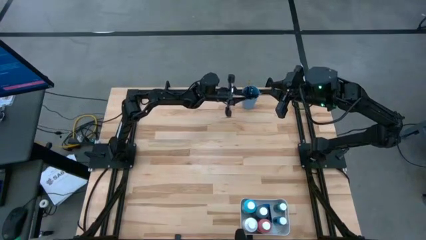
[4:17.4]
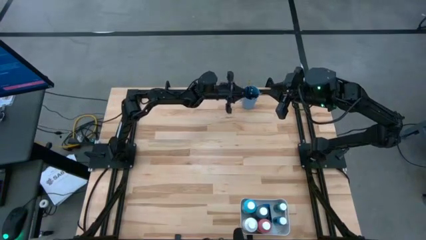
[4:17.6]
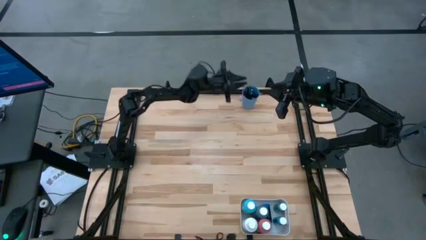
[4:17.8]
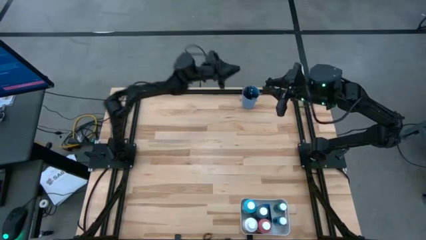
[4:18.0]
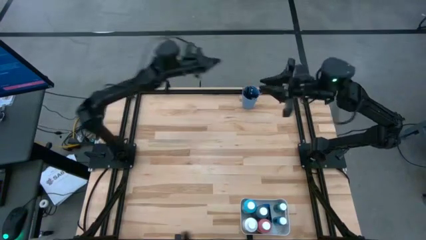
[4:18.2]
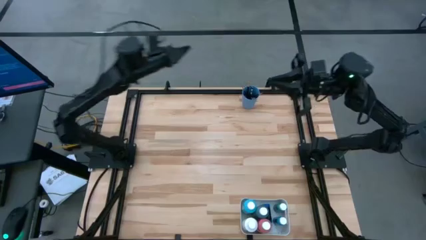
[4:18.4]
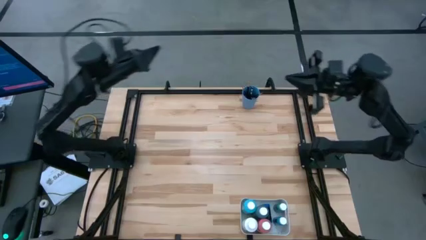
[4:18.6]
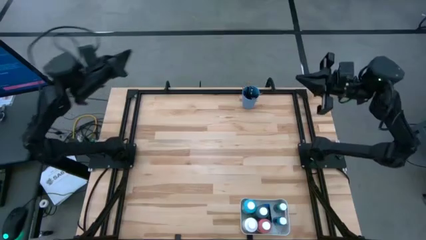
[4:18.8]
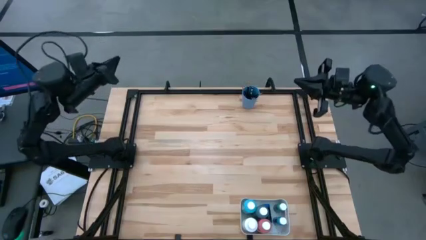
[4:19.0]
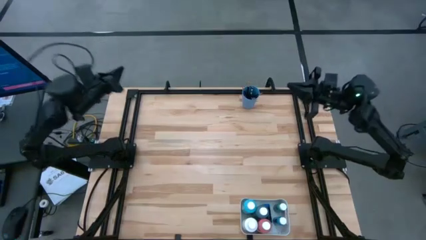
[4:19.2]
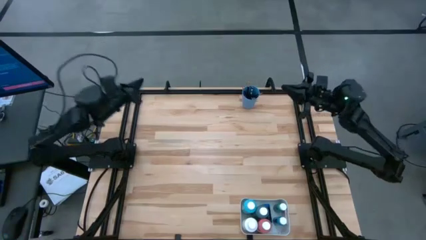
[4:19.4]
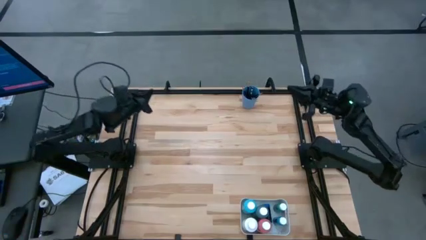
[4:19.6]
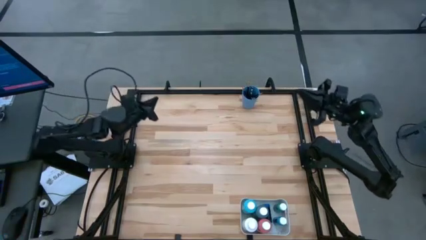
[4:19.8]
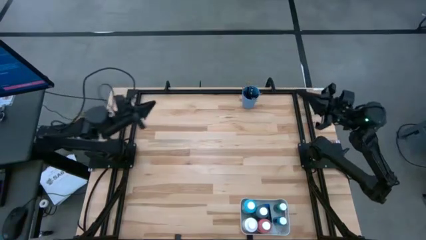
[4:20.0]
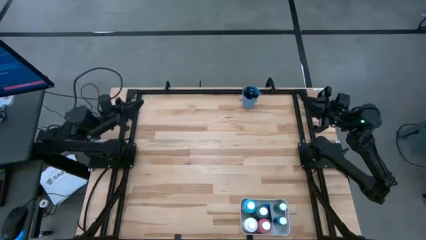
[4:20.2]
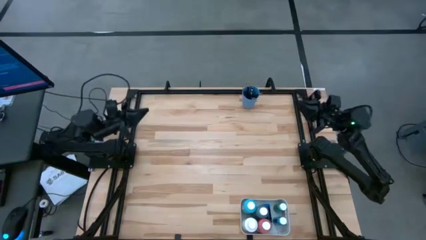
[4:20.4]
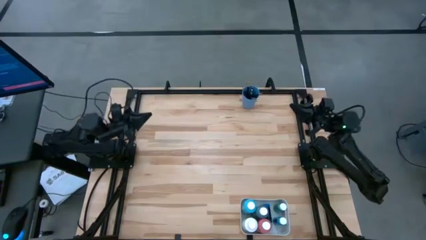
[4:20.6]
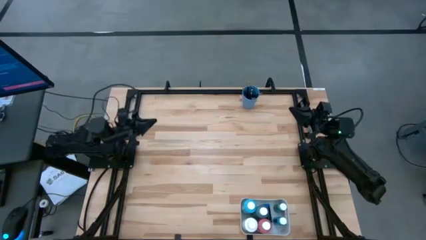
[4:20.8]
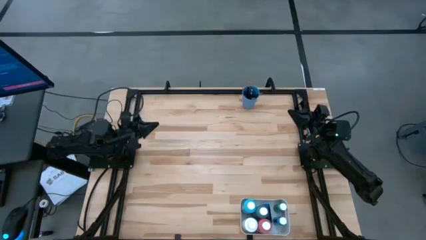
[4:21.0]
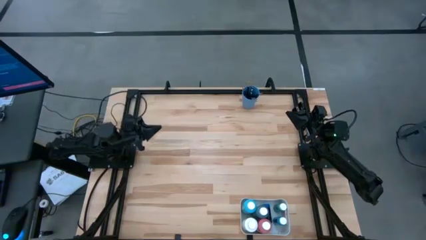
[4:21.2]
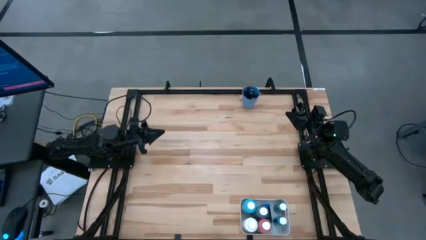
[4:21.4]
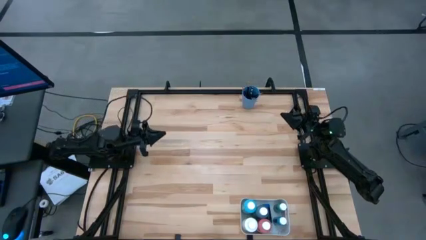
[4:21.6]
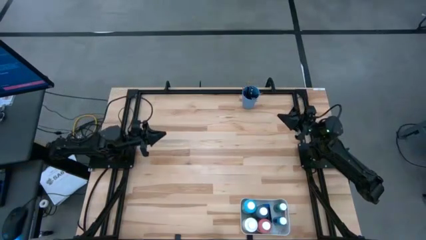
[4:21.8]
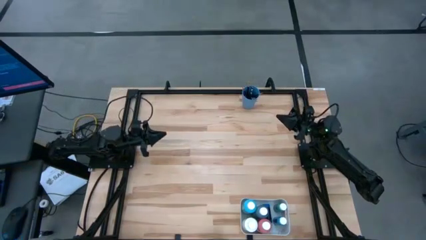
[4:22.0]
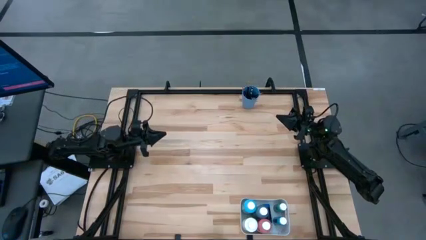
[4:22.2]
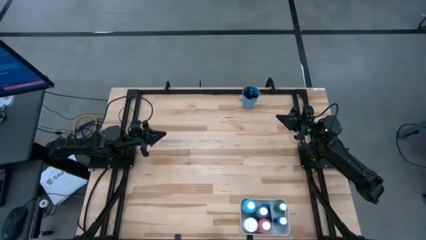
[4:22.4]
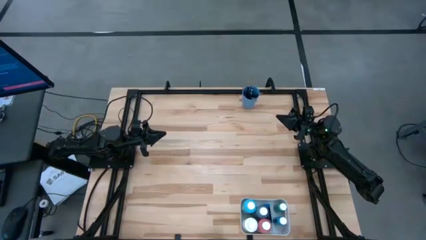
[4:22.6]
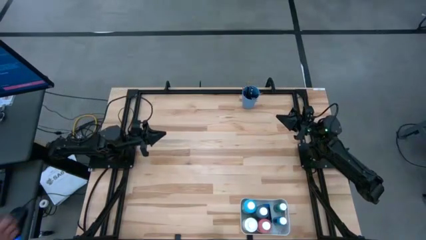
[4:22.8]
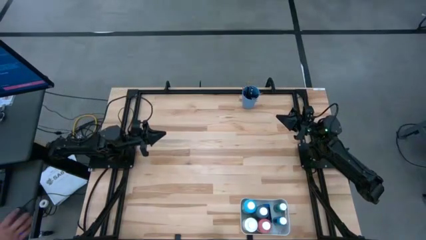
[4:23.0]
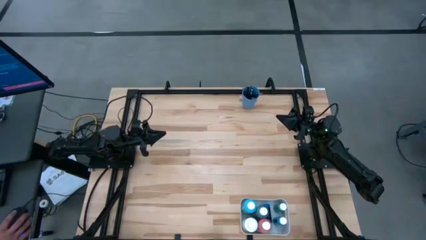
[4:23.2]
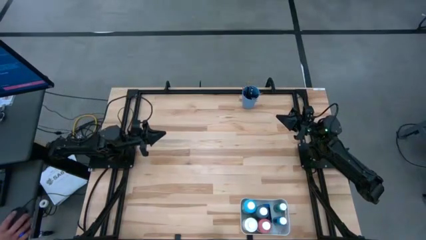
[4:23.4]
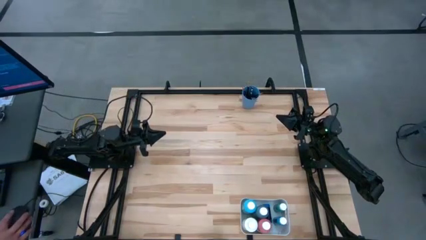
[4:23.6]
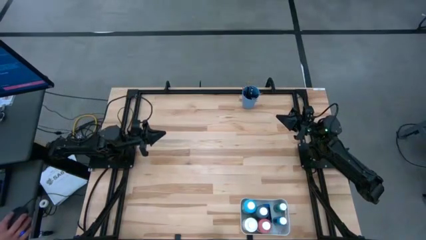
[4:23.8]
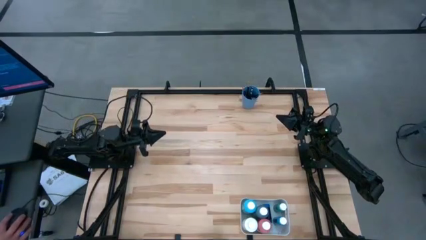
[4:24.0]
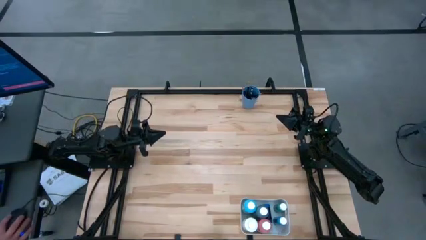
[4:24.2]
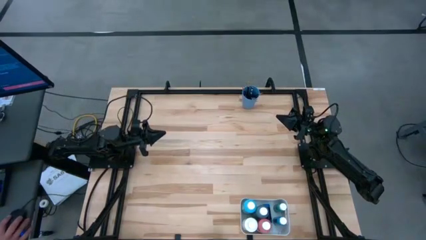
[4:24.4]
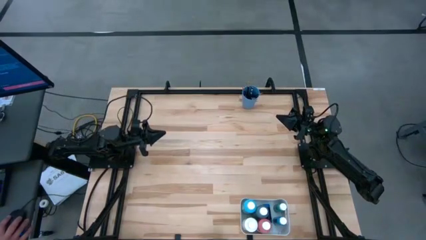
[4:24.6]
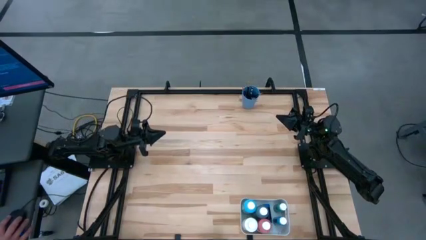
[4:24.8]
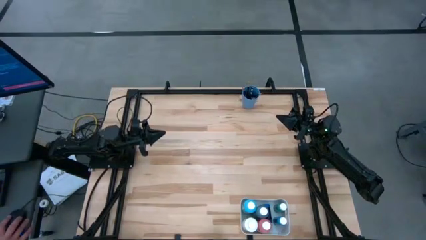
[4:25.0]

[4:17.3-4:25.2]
Task: Pick & Place Paint Supplies
Return to Home Position

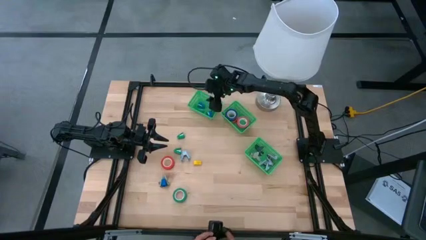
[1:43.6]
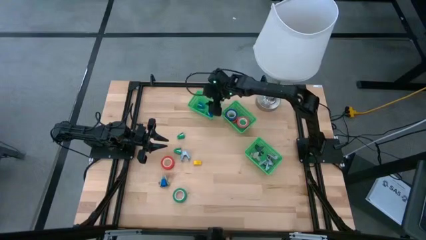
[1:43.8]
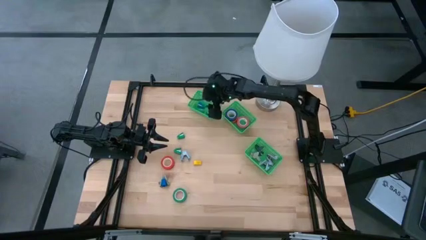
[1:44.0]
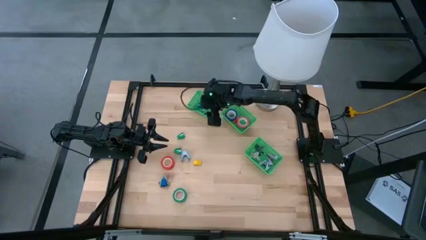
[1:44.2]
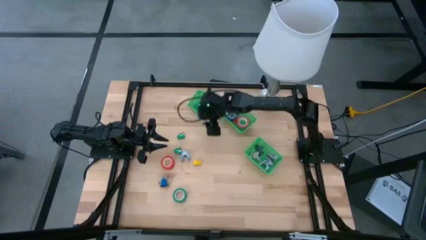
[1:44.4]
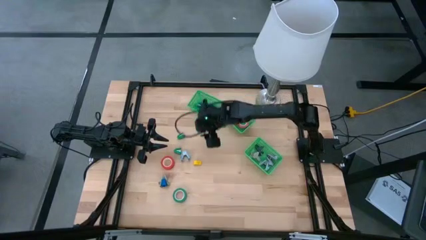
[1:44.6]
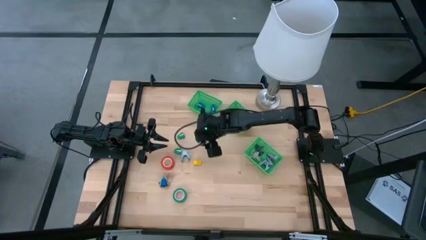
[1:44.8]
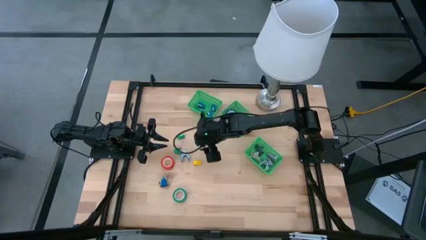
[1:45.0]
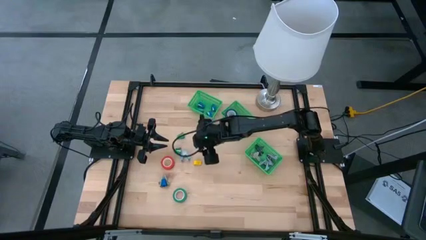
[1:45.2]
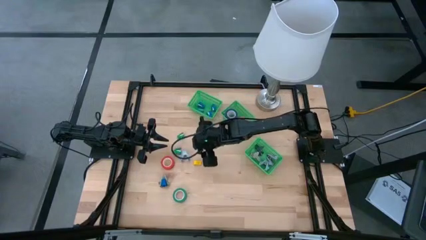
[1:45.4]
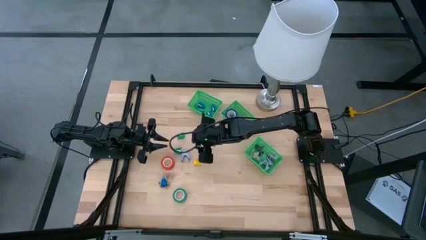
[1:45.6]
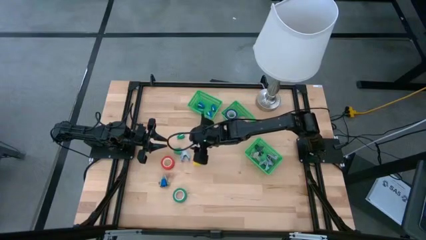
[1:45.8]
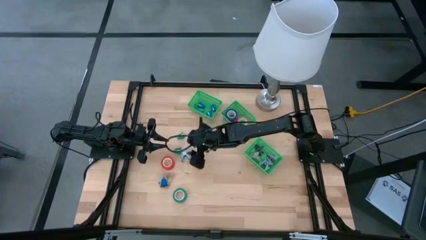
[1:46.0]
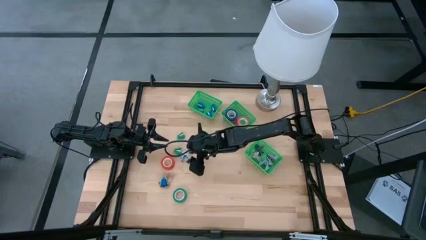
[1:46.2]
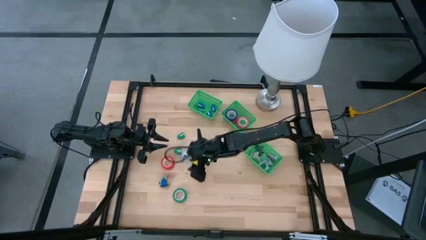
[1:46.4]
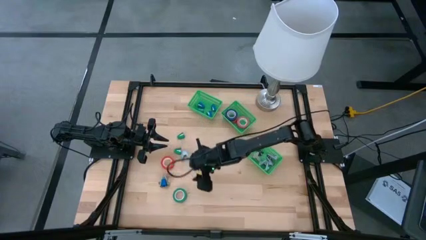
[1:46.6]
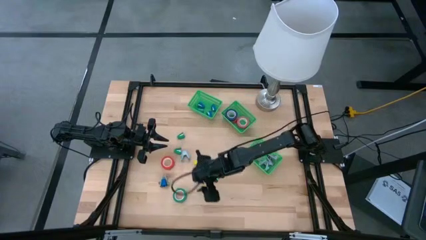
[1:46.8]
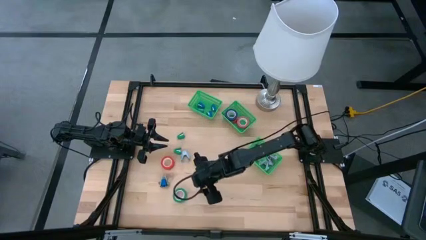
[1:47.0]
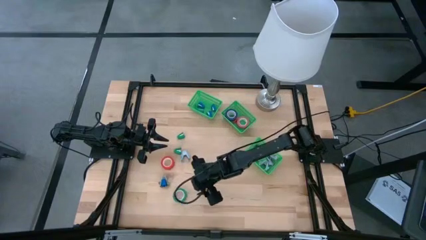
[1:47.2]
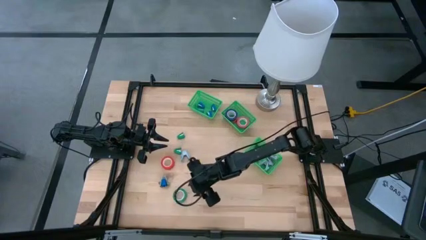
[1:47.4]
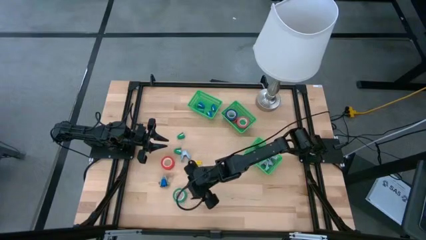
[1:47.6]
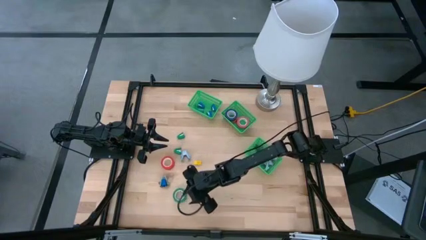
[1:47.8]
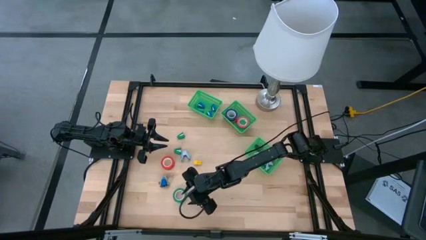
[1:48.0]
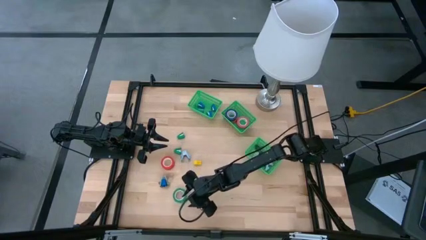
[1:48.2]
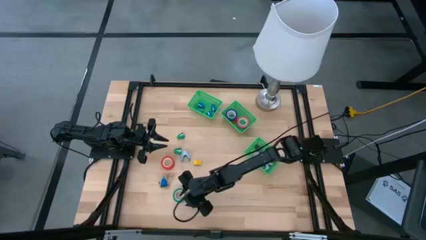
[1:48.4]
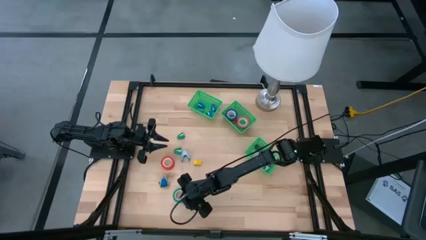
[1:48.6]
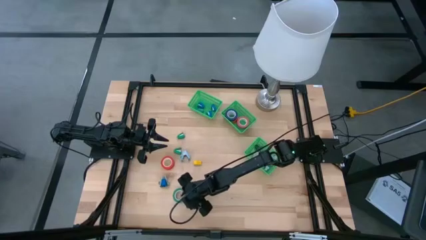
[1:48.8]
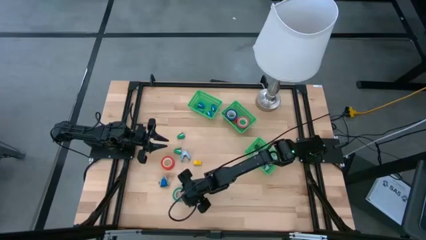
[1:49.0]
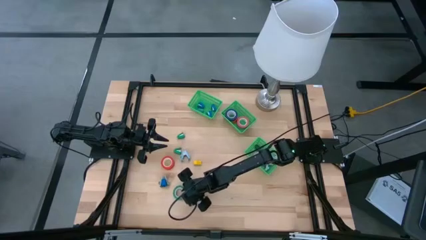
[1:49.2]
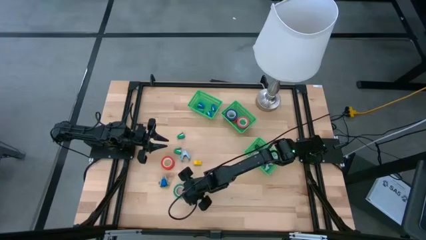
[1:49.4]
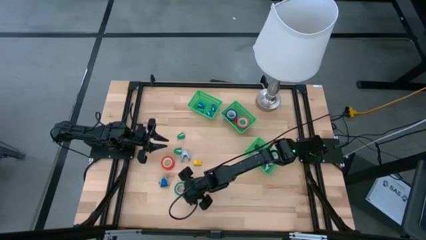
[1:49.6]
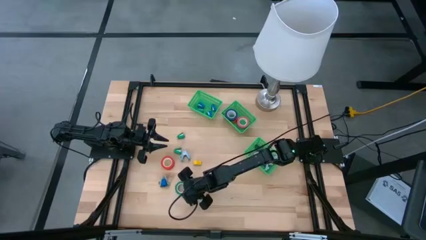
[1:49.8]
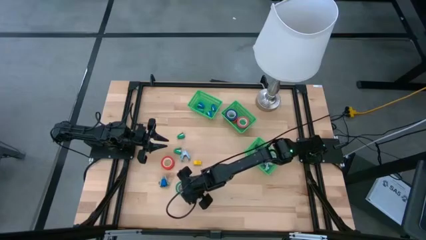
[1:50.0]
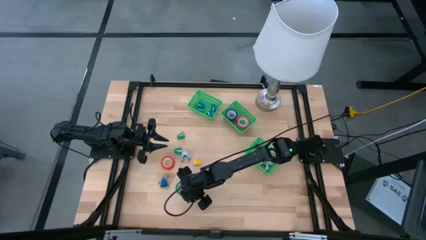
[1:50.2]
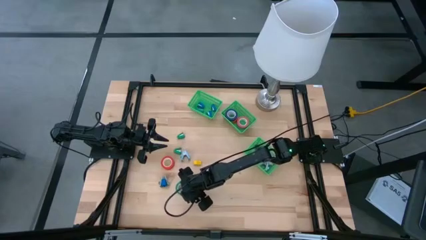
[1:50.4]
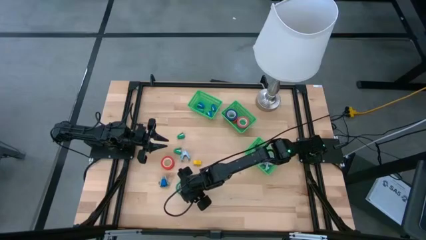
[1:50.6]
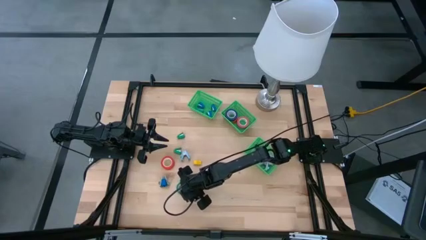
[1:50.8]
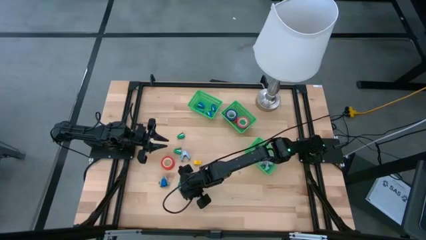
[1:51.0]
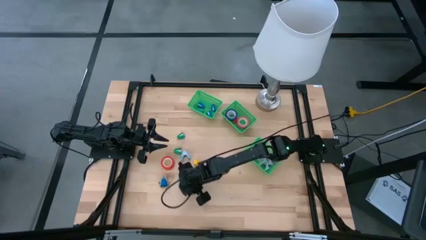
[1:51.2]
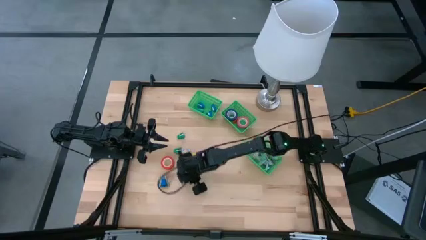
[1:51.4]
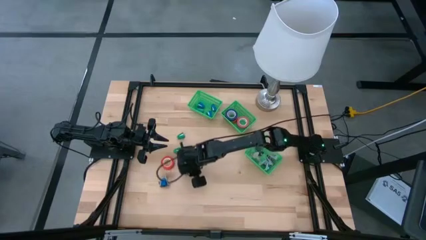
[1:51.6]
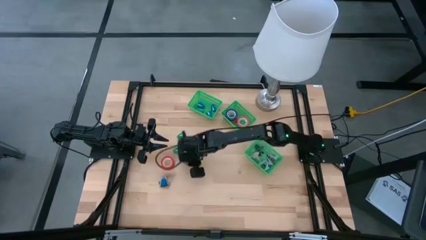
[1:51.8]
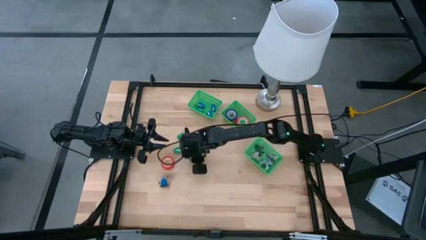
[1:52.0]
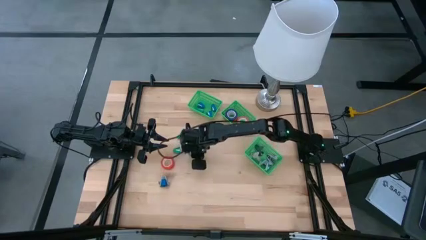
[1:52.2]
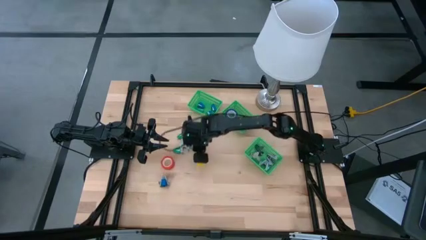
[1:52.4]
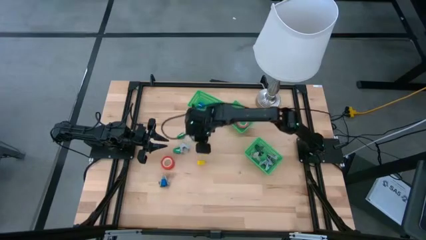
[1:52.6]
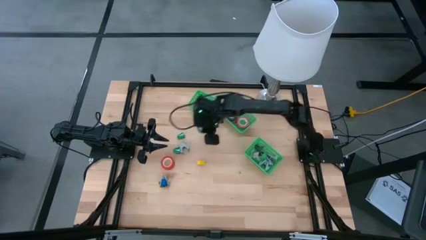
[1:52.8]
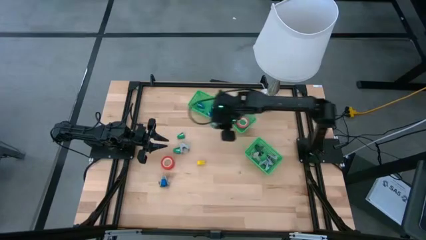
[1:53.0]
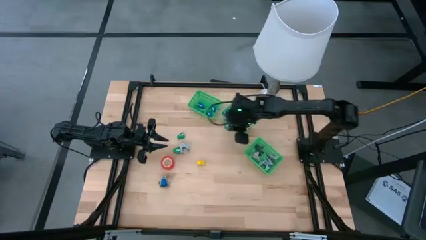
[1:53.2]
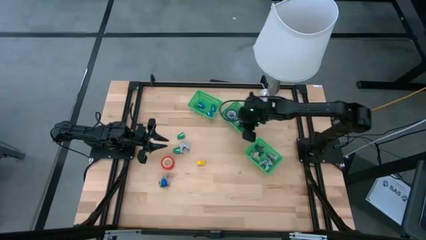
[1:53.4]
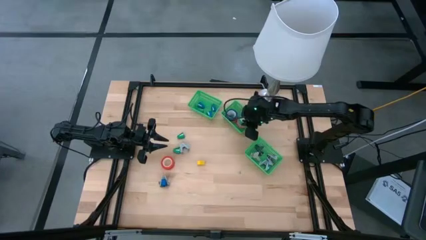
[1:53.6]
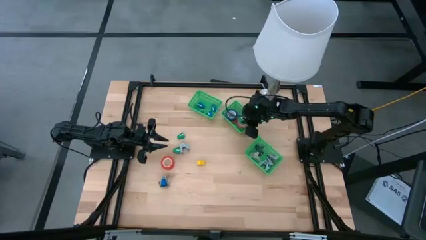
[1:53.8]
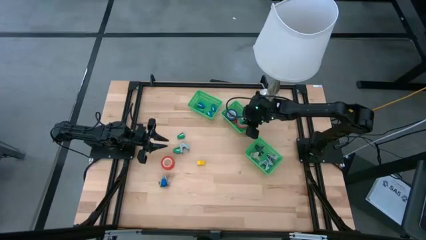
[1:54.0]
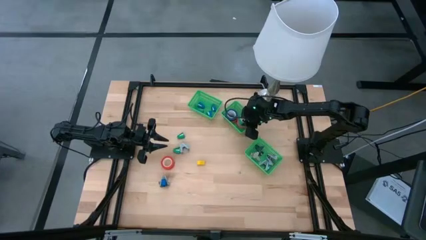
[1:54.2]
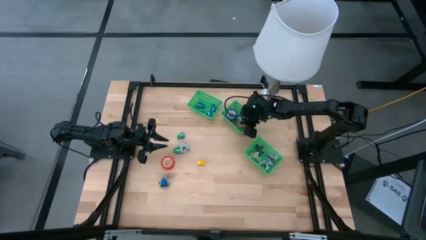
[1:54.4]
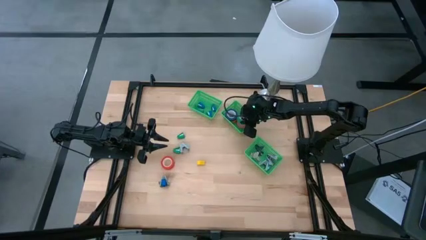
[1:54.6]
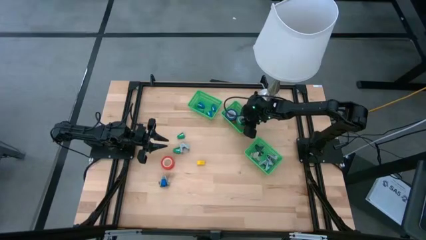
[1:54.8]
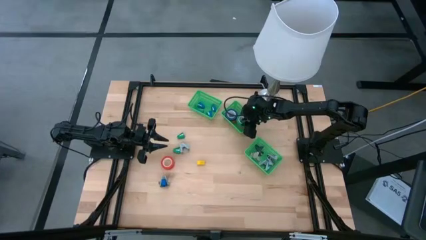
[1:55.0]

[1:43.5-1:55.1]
Task: Pick and place Stapler, Stapler remover, tape
Put the green tape into the middle basket
